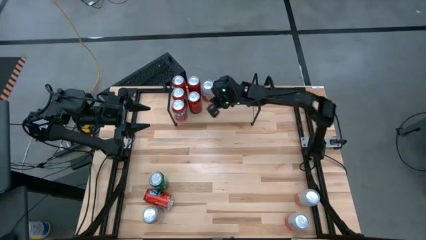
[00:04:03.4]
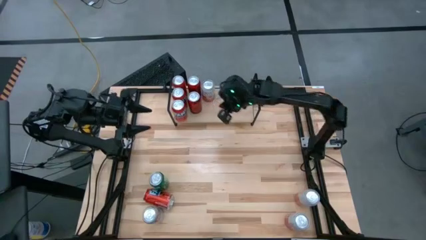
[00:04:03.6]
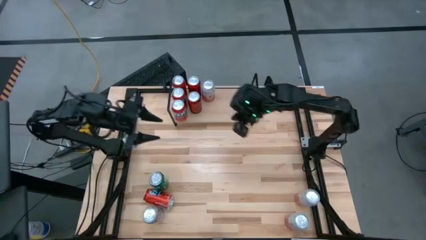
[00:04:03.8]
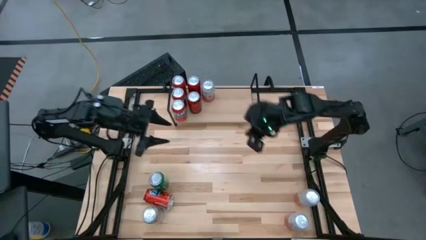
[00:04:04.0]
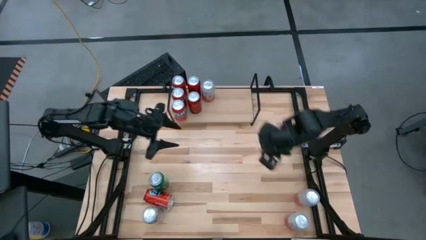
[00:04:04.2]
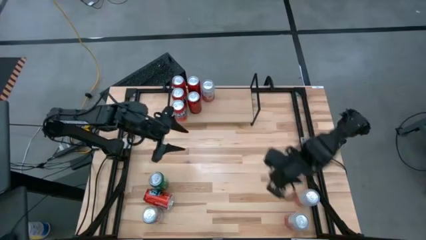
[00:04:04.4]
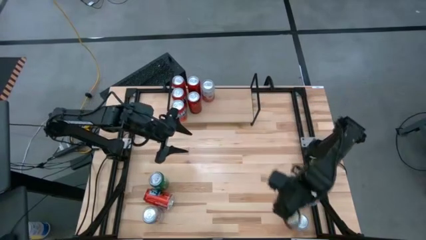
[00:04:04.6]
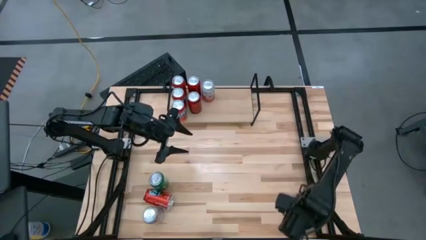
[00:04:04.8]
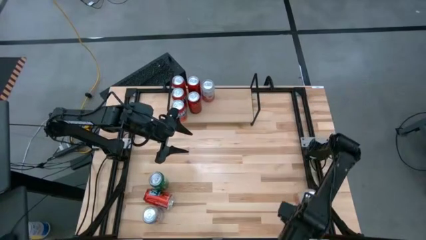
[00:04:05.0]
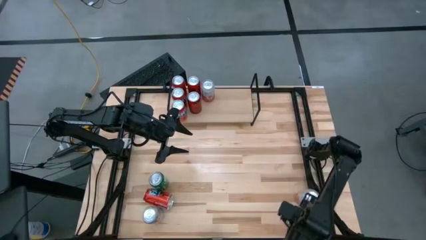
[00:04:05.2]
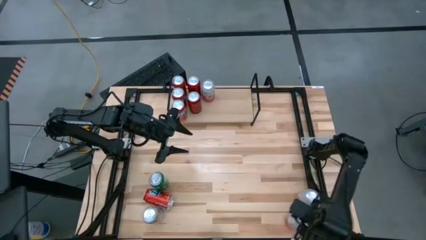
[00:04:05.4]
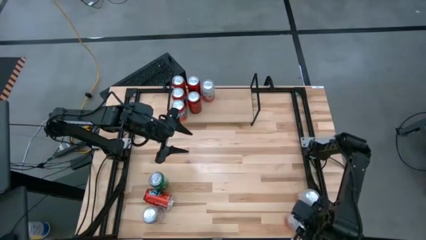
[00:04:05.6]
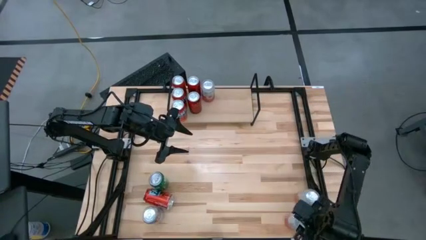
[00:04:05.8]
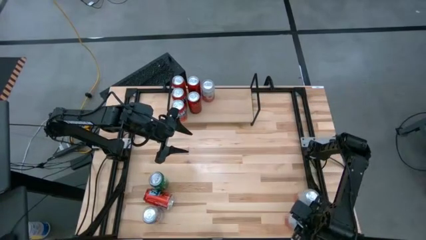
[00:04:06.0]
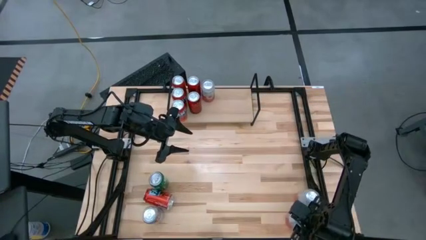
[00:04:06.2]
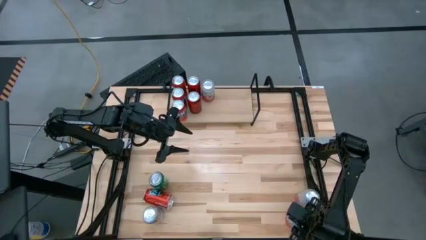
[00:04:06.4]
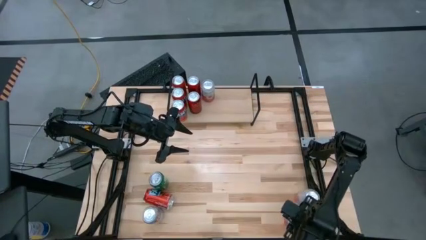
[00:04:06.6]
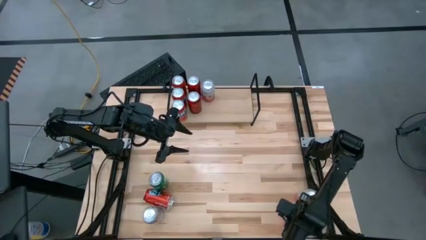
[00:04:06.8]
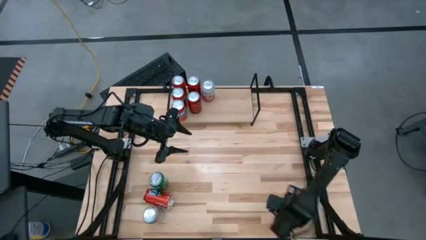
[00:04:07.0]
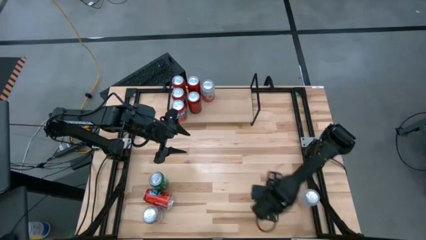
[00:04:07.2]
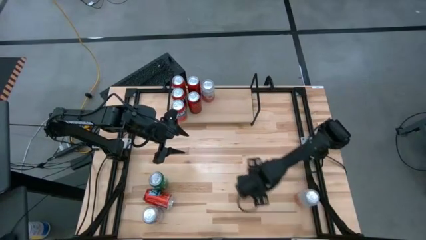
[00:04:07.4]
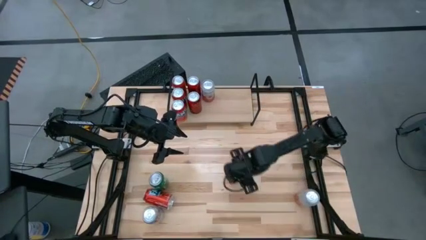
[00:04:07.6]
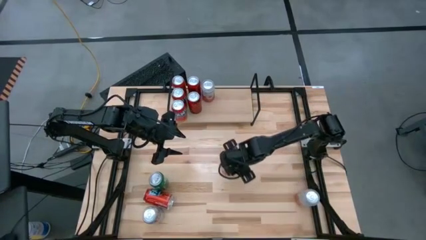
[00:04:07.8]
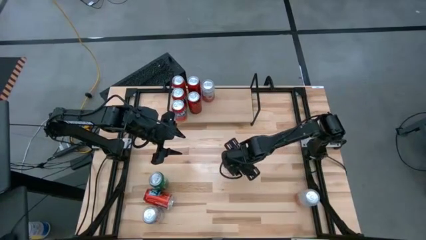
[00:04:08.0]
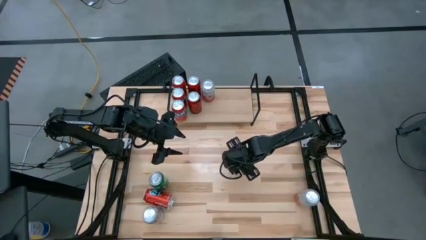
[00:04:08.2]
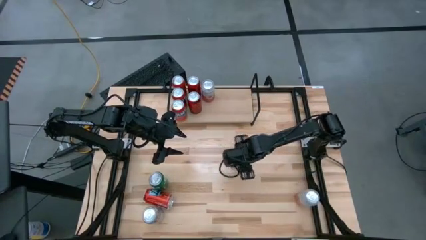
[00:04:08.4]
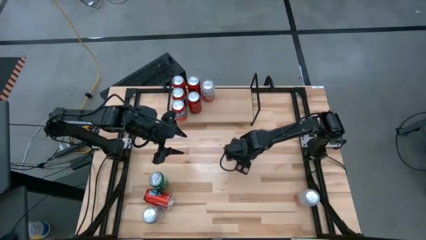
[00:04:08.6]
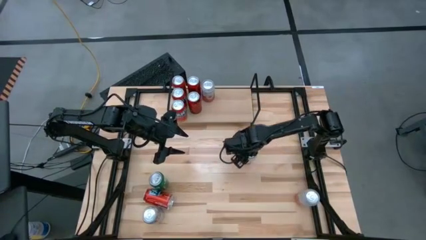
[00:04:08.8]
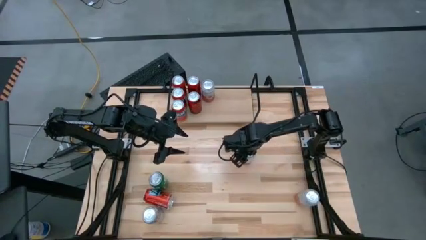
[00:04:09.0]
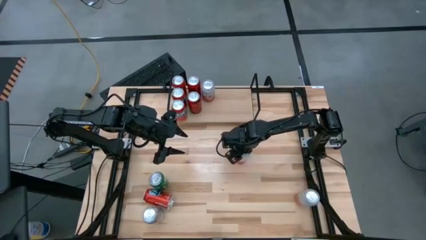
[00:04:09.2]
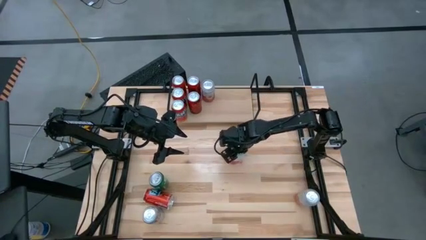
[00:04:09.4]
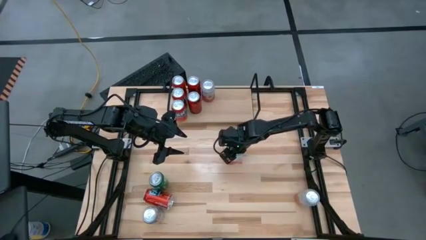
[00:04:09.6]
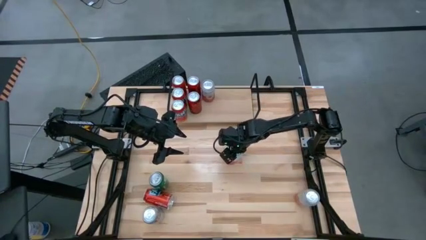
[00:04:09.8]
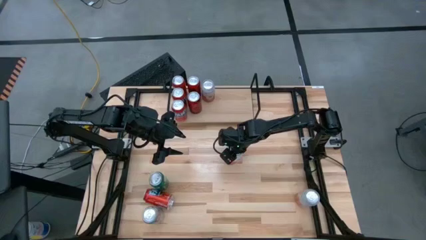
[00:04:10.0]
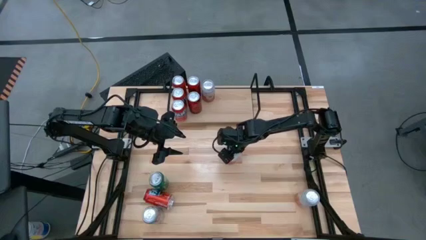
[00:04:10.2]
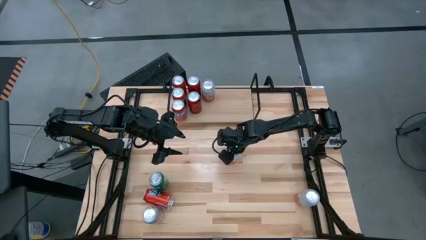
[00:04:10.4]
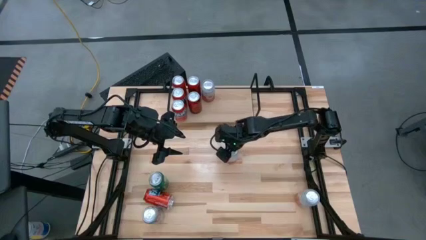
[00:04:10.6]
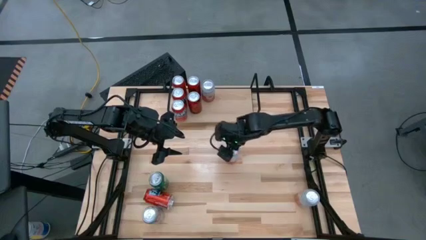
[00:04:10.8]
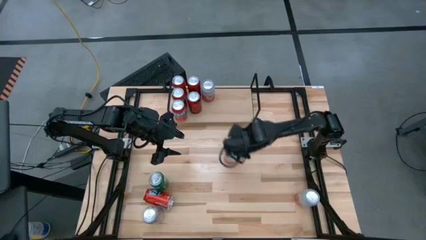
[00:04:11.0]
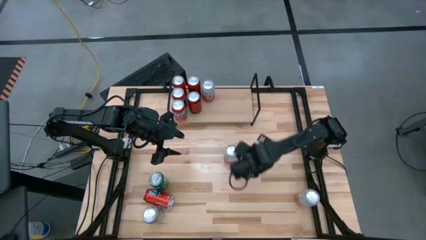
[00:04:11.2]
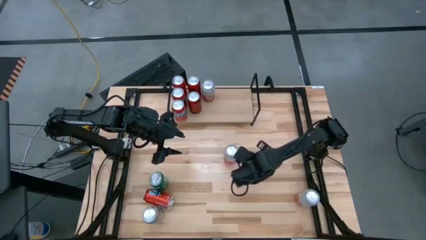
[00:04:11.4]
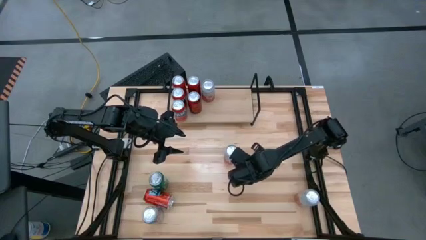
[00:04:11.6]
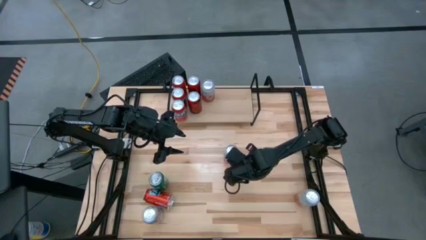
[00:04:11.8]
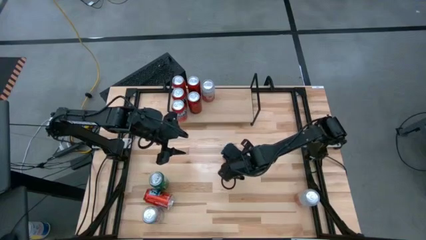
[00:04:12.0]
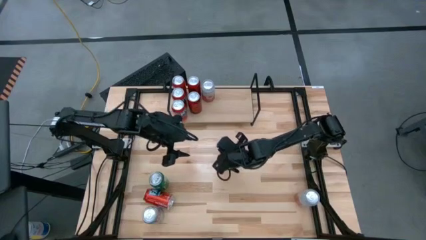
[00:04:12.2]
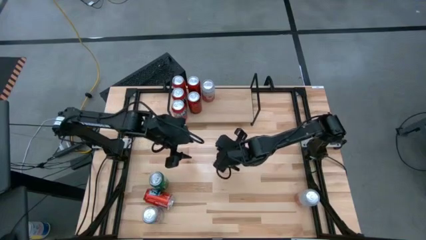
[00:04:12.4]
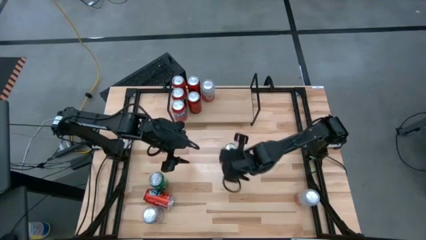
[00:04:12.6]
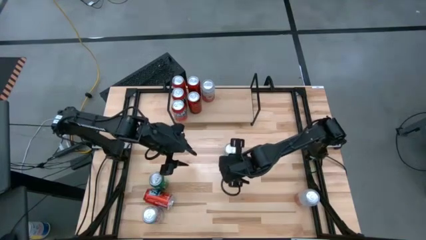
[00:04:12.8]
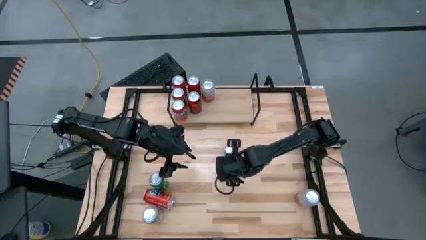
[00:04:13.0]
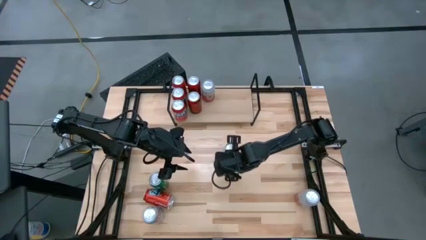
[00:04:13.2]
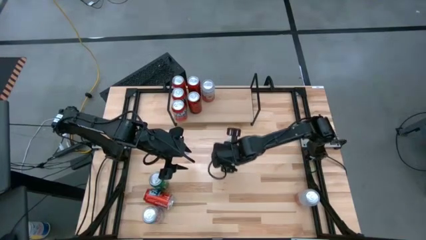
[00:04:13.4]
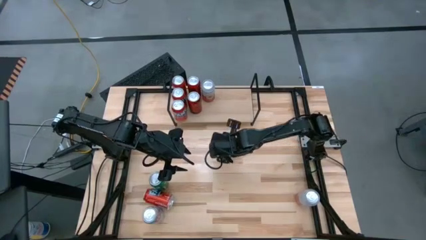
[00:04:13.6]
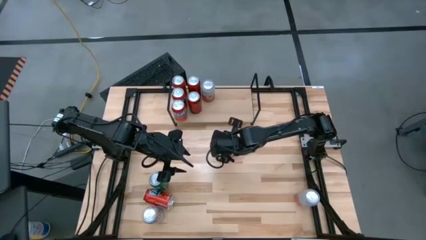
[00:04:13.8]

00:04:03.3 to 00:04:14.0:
Task: Place canned beverage on shelf
Put the pink white soda can on the shelf and align with the other pink white soda can

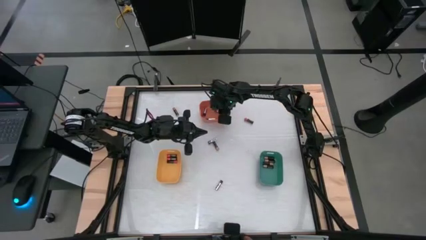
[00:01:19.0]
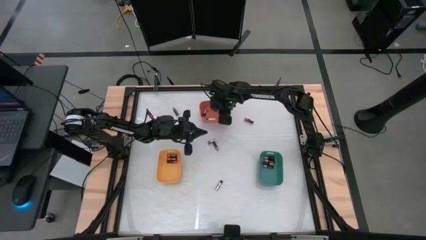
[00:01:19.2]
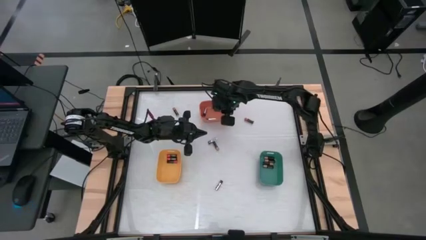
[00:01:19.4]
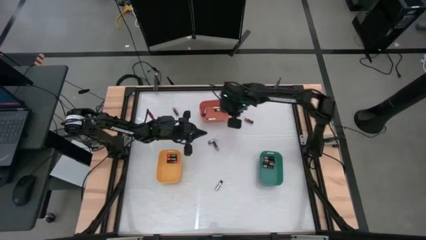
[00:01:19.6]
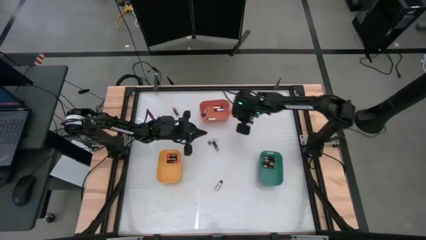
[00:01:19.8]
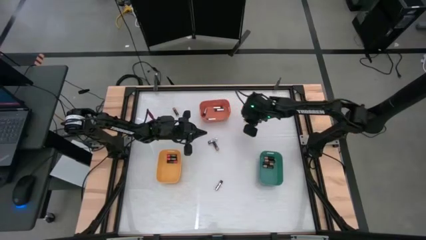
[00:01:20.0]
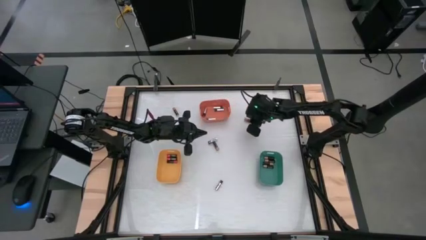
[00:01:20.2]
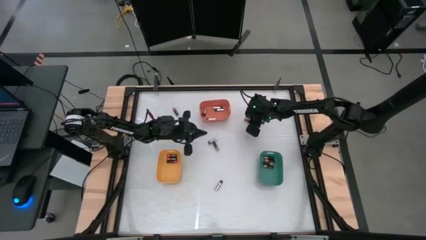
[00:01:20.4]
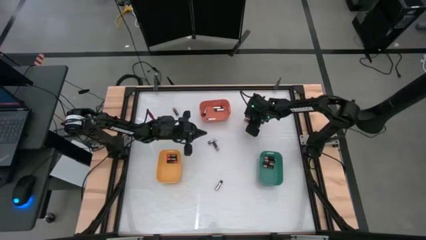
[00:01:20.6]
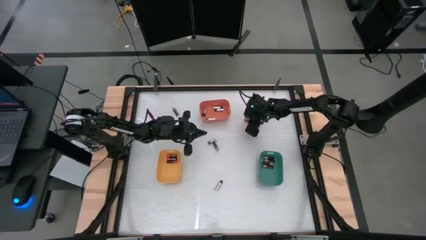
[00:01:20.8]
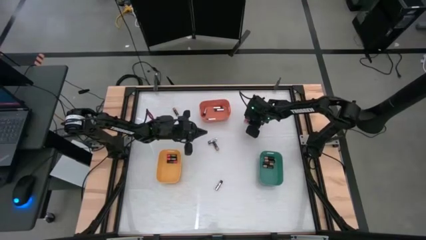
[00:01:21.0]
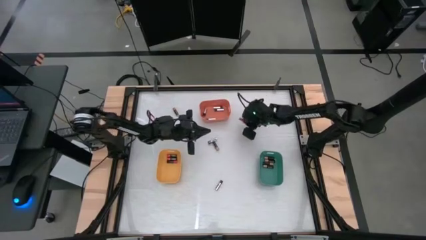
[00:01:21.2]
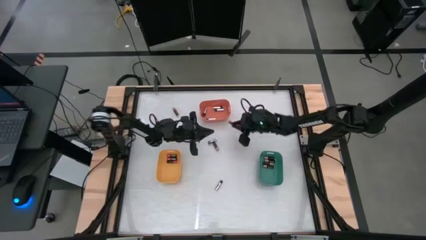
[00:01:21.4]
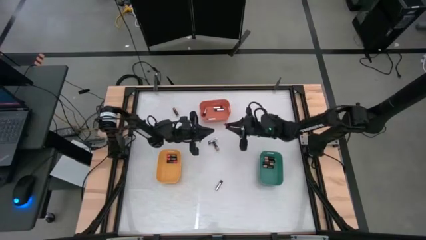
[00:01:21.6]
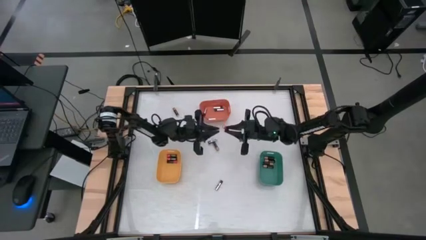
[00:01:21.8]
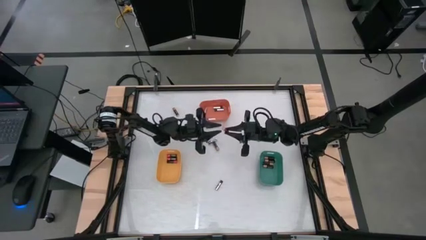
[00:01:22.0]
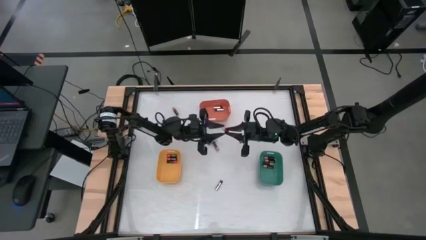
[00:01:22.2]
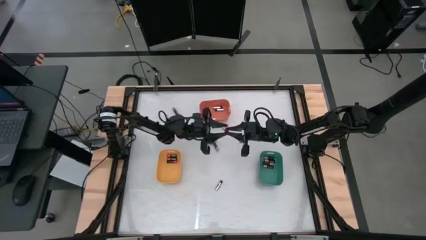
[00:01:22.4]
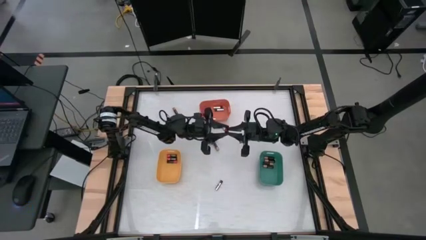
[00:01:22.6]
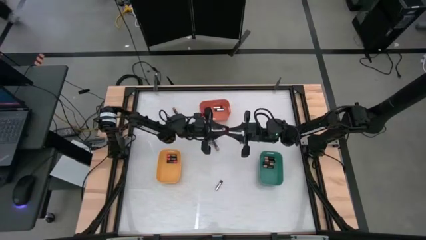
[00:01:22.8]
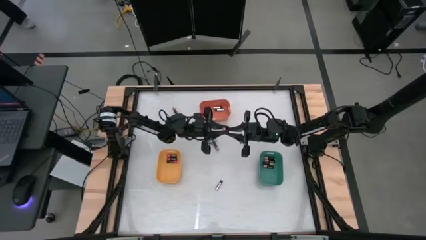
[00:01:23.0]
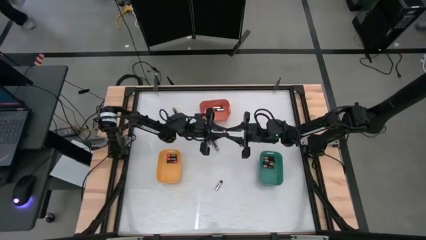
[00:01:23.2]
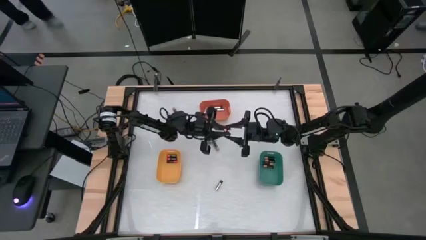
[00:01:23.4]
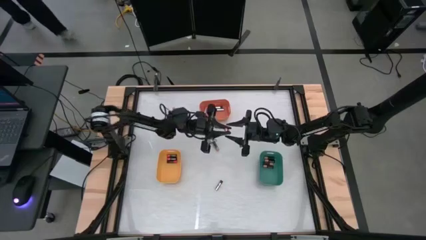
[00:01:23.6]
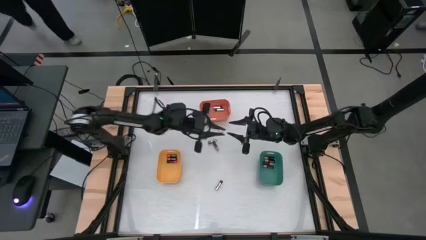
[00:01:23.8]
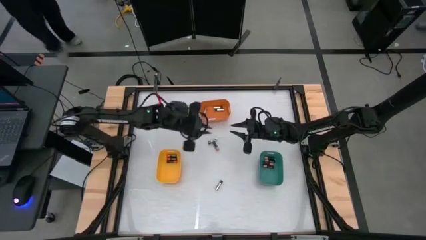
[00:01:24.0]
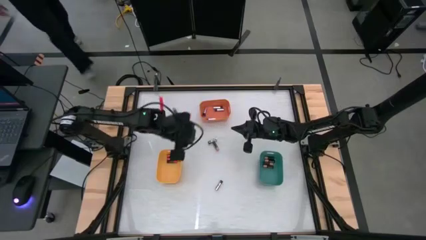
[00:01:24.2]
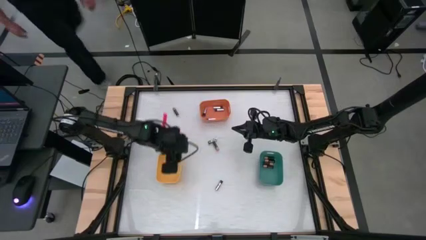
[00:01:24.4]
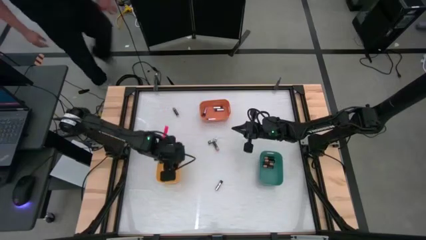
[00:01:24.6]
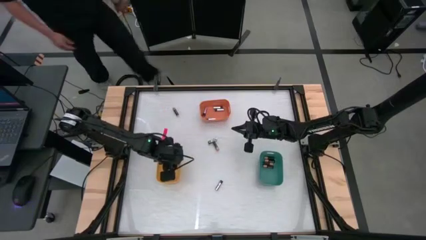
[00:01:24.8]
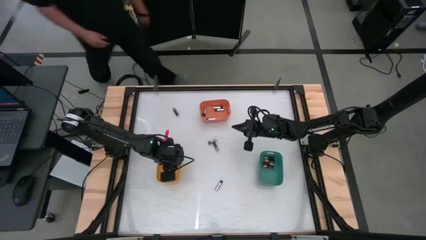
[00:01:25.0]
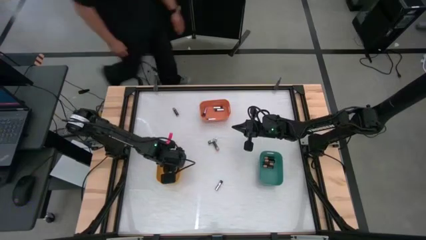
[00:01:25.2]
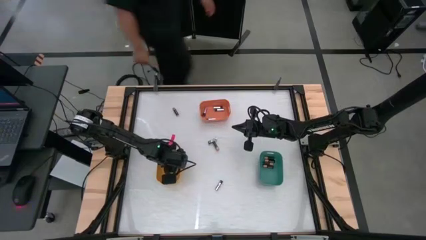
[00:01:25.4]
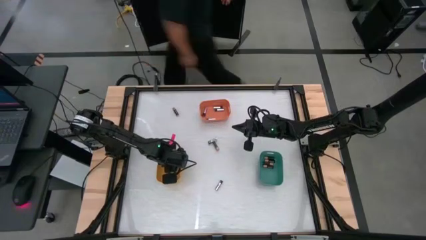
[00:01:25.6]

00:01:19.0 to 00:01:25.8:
Task: Sort batteries
Put the red battery into the yellow bin
